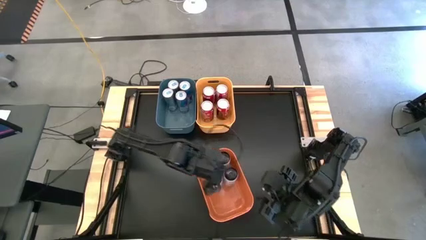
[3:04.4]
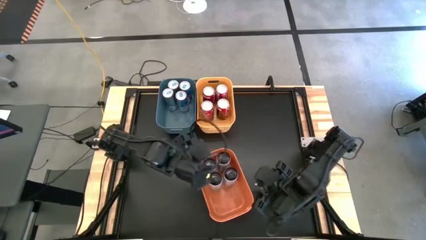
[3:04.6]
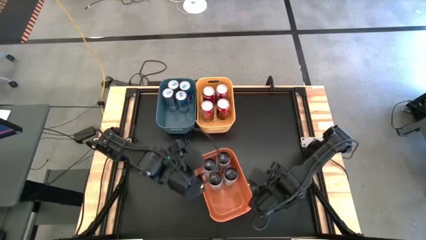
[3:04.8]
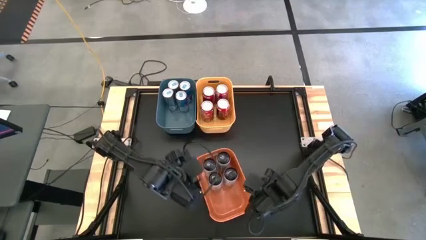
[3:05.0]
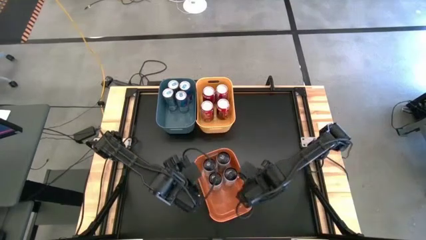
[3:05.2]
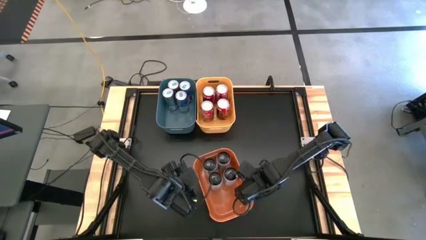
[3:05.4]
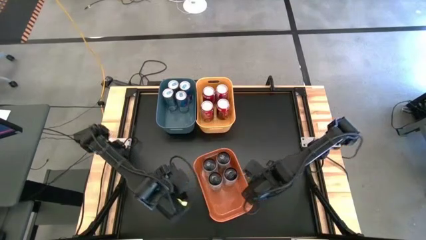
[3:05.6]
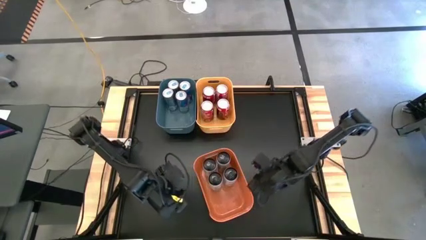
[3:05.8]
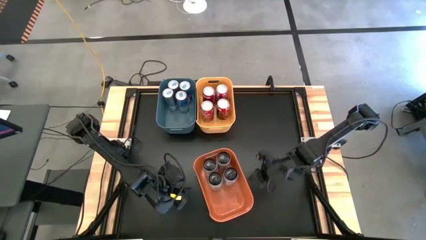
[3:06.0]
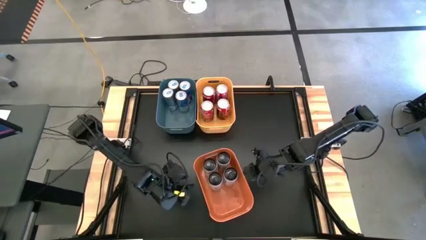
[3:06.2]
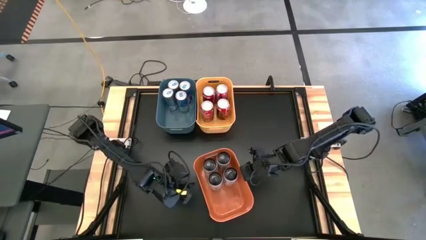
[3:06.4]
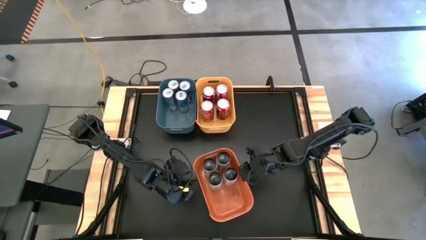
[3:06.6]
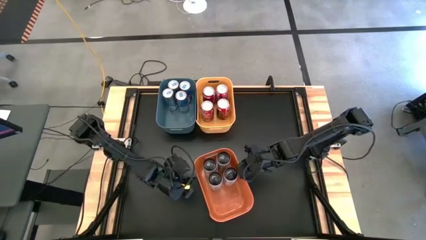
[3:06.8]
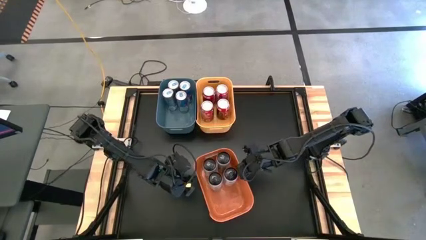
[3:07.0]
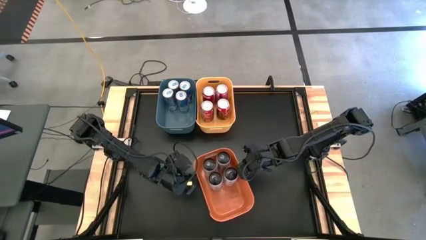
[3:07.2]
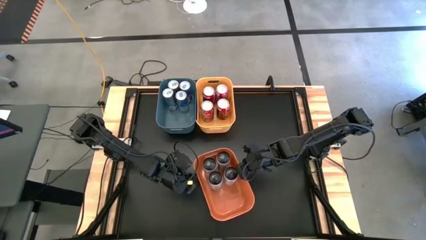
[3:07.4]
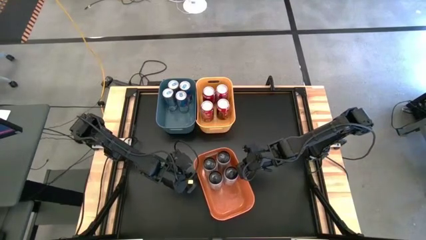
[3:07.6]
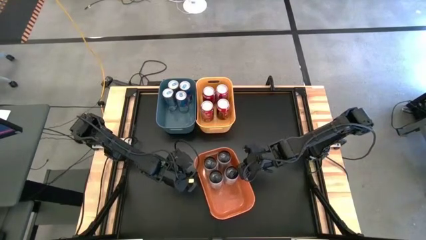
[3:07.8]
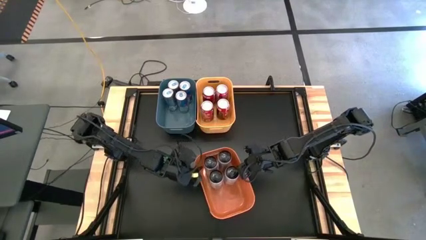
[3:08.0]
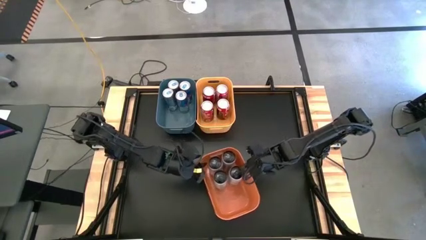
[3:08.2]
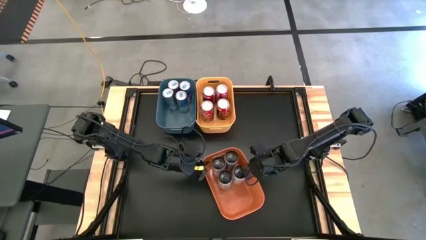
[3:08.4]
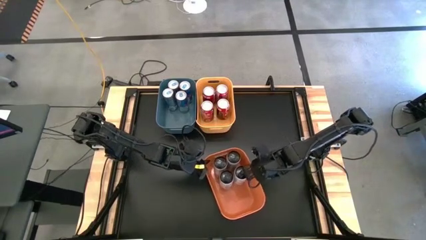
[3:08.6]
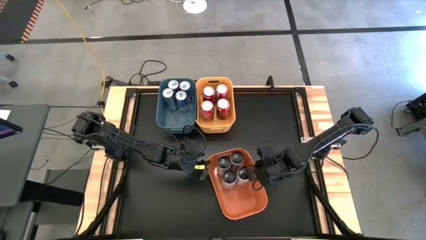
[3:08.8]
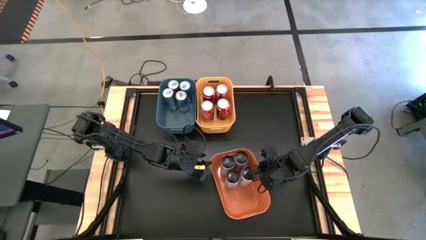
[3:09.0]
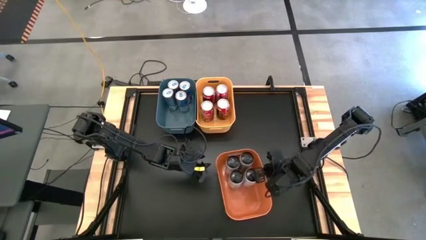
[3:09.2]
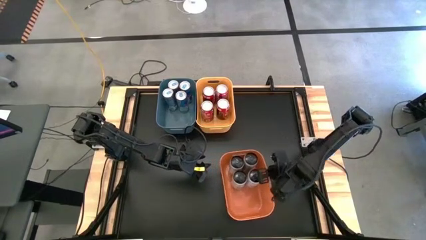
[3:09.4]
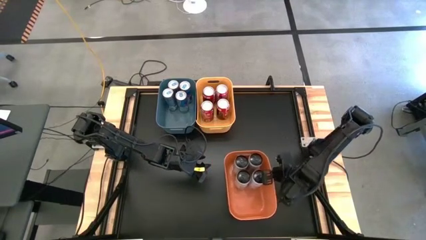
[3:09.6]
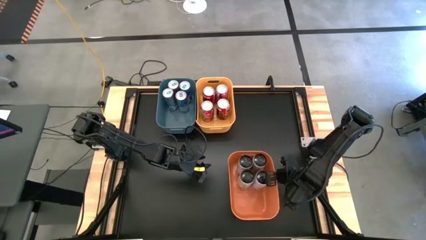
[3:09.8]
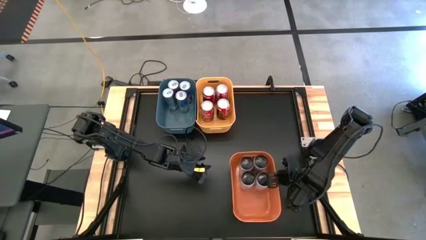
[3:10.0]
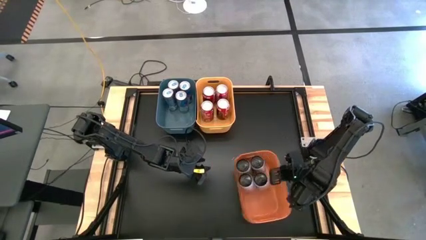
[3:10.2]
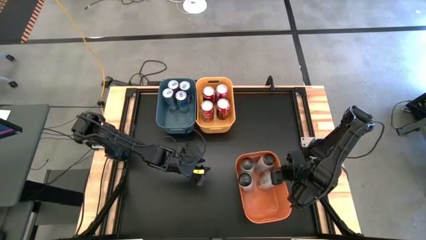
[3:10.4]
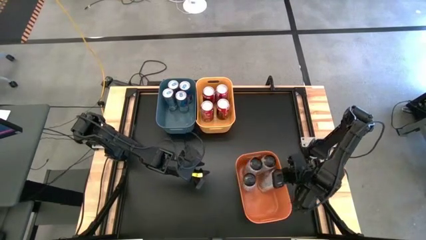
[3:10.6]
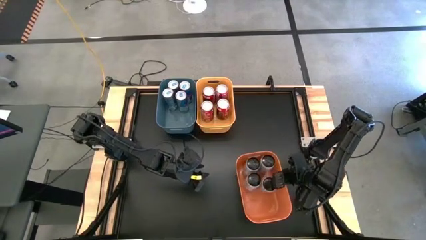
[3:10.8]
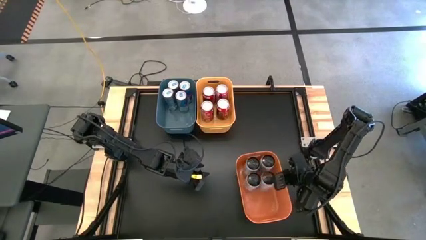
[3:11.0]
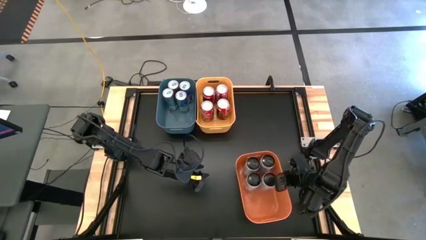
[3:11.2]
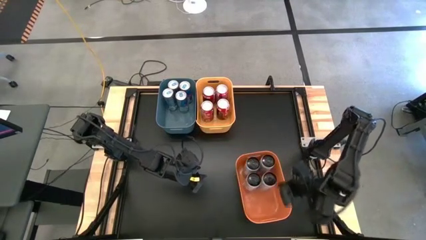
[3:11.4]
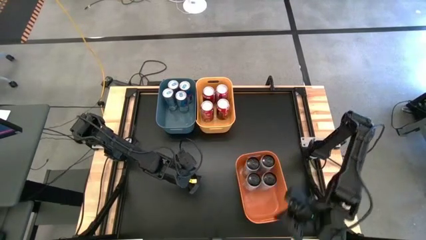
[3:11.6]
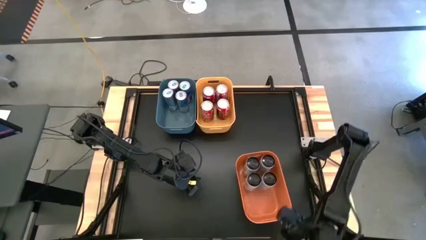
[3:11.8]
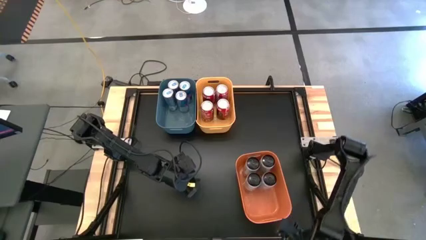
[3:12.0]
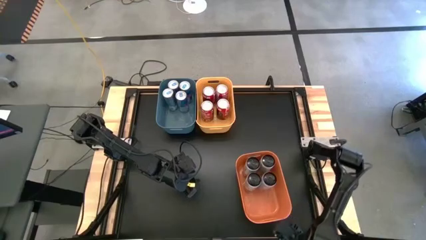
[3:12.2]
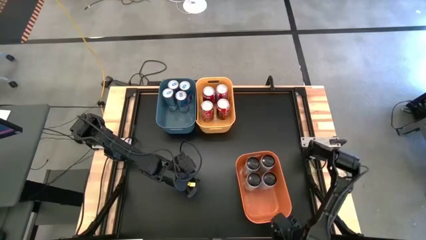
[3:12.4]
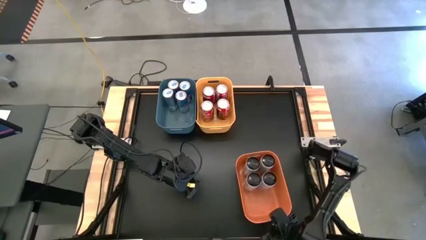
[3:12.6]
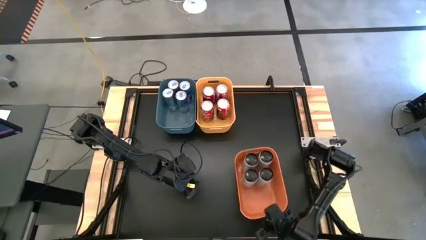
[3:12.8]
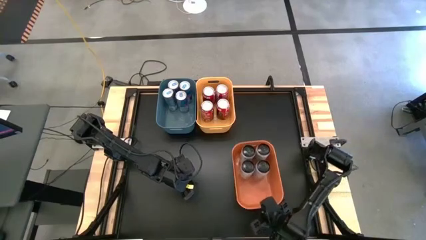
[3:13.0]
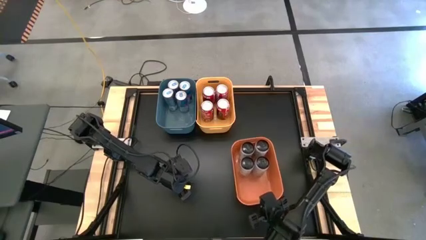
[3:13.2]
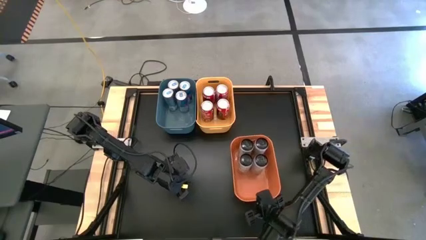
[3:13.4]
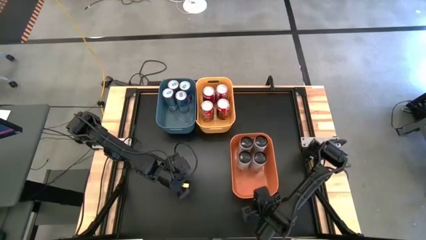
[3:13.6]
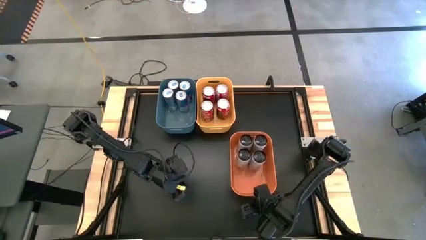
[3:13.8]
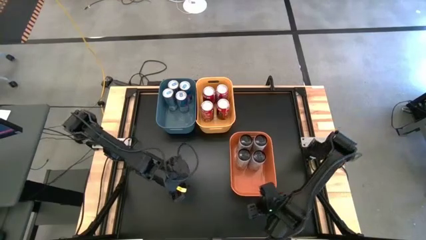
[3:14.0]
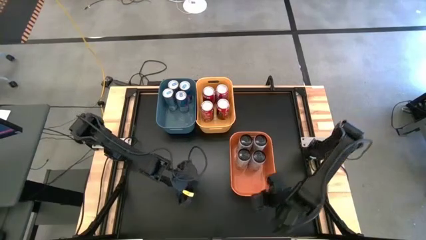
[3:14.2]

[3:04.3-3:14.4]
Task: Sort soda cans
Move the orange bin to the top right of the table

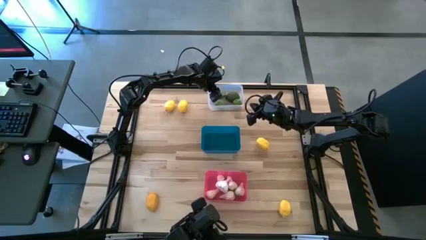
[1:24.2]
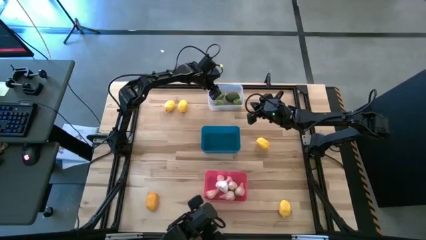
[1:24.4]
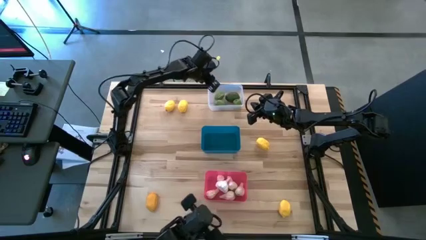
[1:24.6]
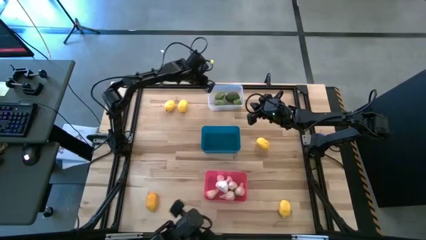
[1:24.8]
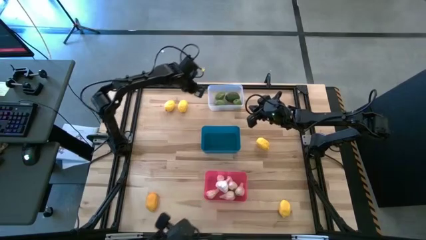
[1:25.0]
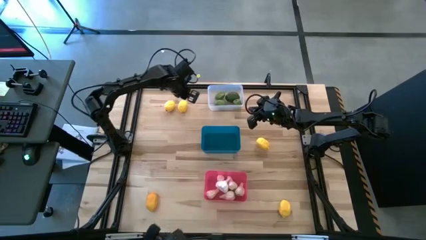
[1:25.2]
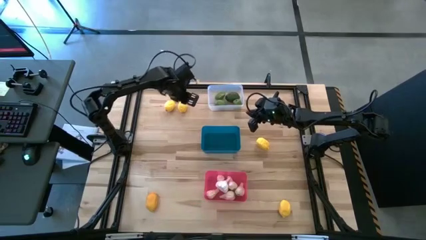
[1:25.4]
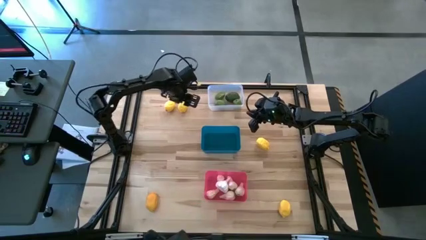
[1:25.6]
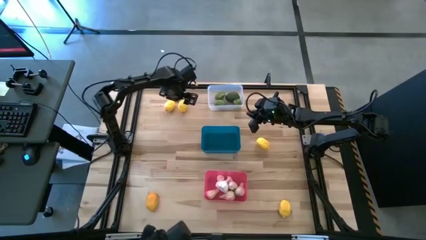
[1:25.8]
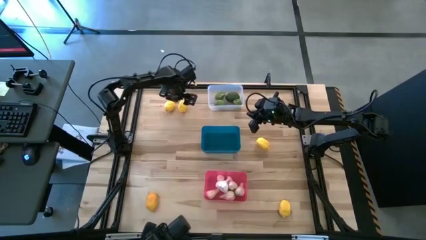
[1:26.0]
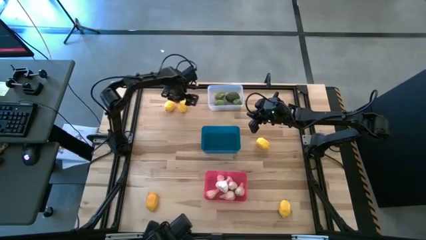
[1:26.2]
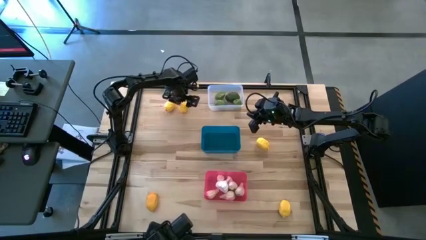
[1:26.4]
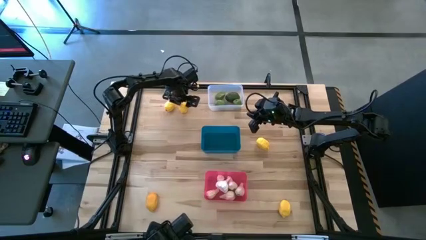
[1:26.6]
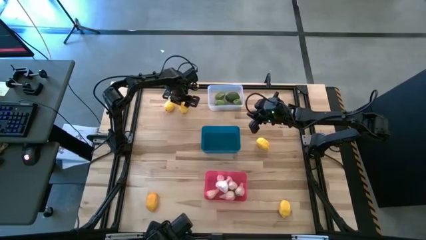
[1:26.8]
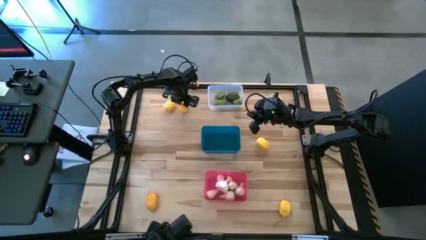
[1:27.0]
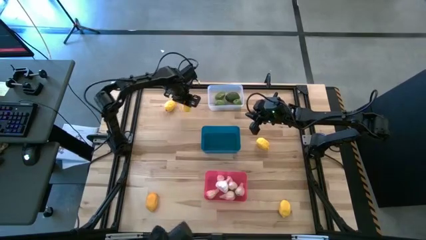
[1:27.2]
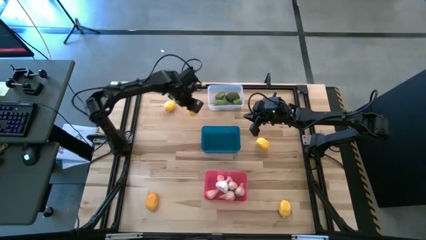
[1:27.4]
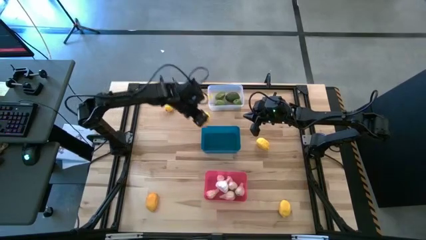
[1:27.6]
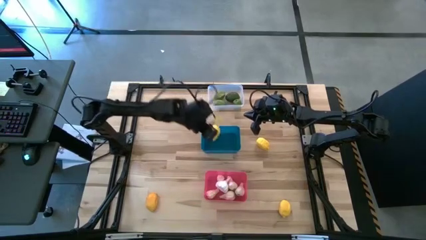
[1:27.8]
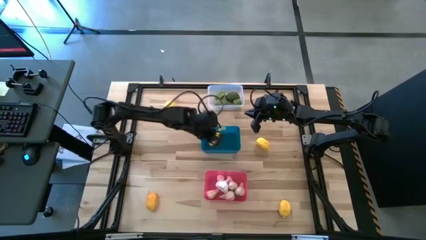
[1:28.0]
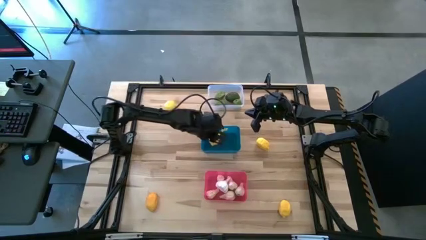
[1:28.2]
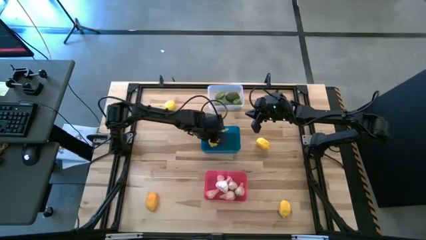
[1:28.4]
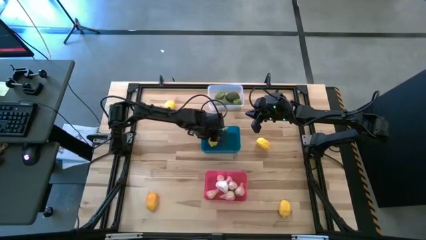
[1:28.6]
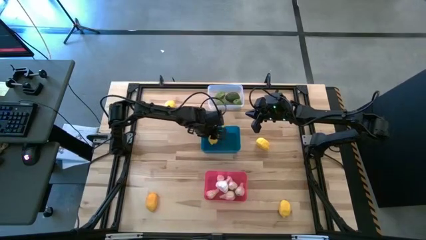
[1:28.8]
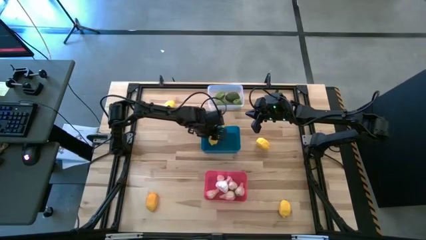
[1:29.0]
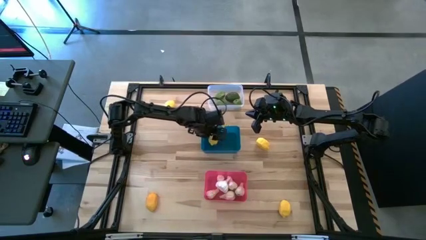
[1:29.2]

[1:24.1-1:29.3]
Task: Sort produce into baskets
Put the top right yellow lemon into the blue bin

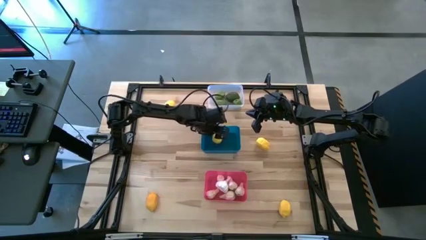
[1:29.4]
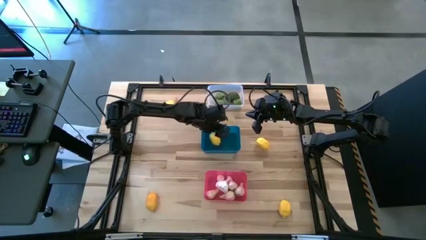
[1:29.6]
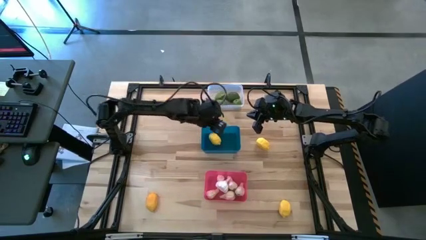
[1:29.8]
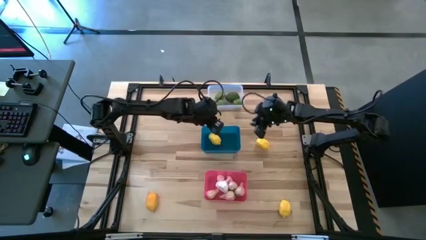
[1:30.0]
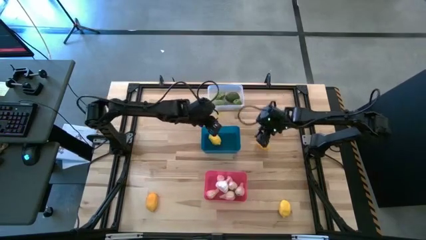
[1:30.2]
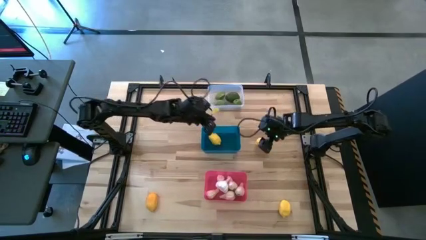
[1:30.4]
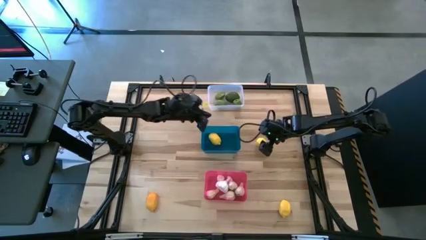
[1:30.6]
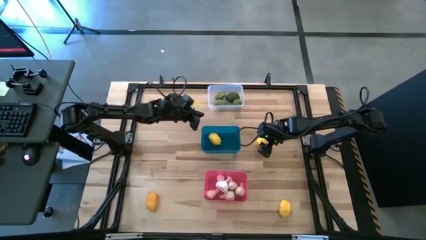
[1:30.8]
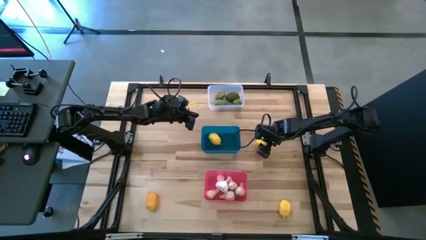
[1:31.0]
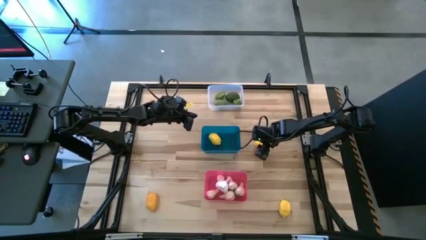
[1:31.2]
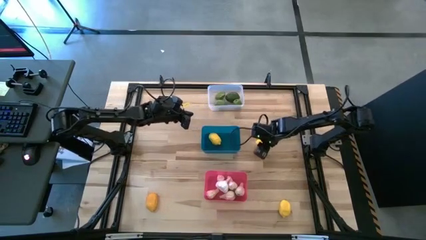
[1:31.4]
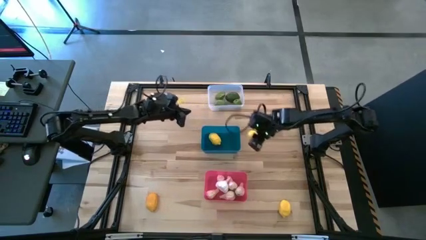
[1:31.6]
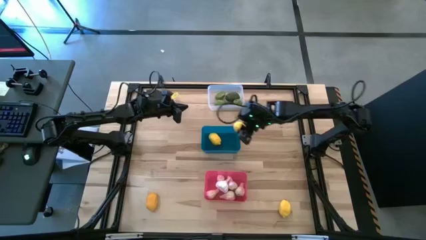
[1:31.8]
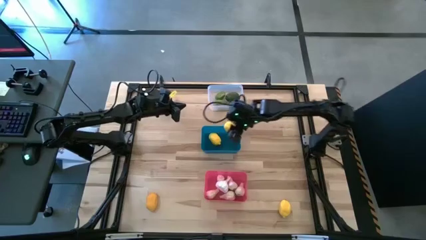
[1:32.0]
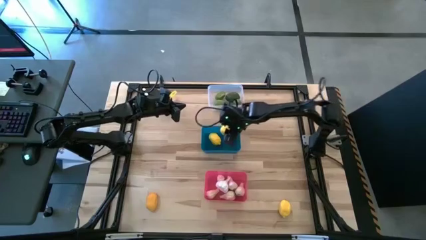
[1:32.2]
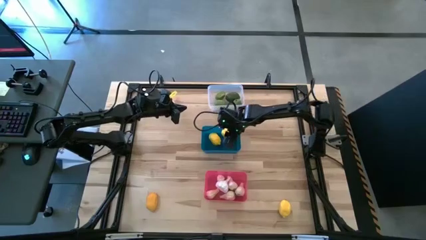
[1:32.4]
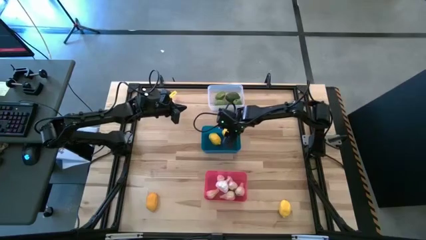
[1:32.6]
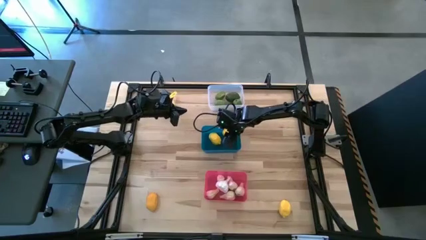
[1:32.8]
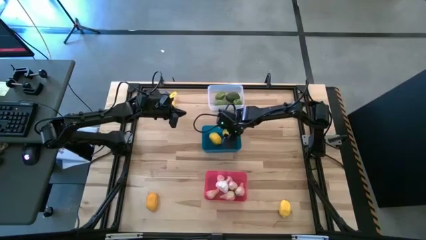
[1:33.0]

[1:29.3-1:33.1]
Put the middle right yellow lemon into the blue bin
